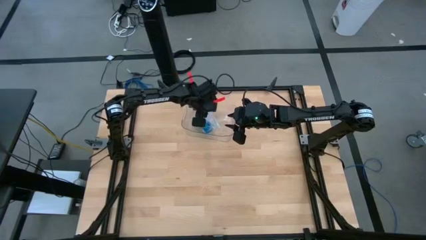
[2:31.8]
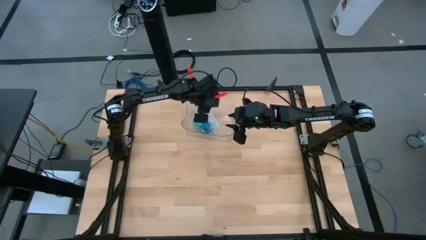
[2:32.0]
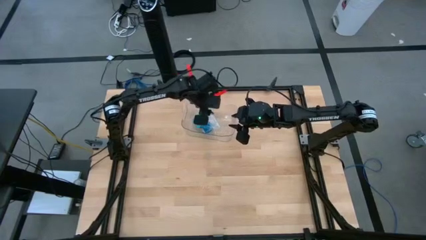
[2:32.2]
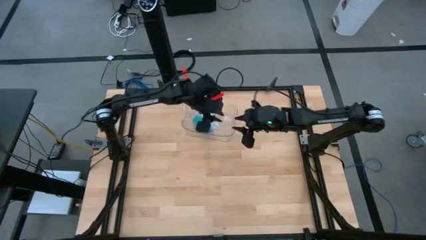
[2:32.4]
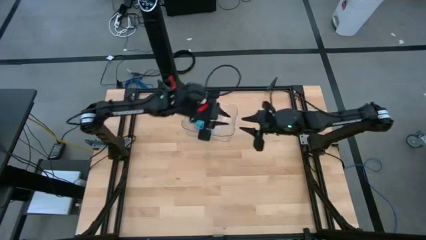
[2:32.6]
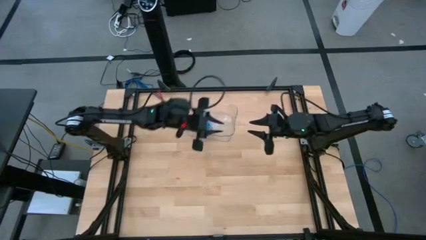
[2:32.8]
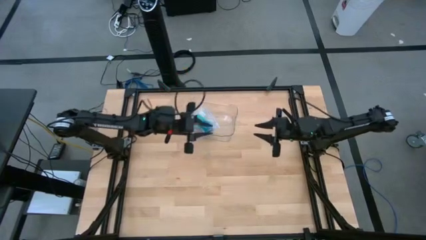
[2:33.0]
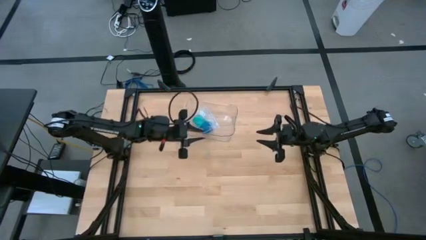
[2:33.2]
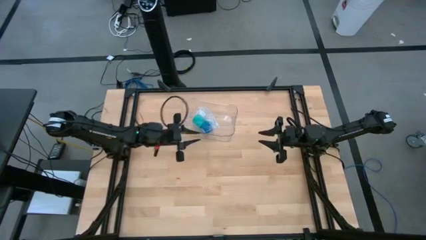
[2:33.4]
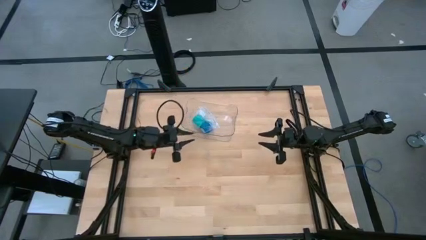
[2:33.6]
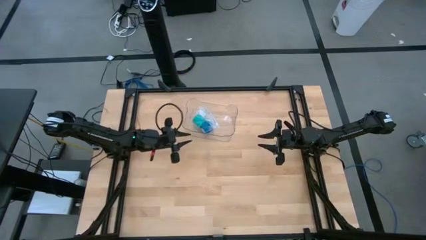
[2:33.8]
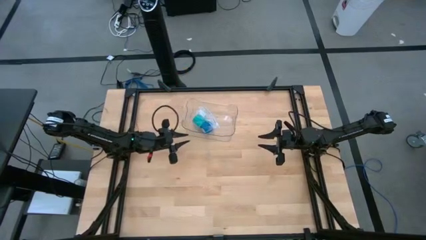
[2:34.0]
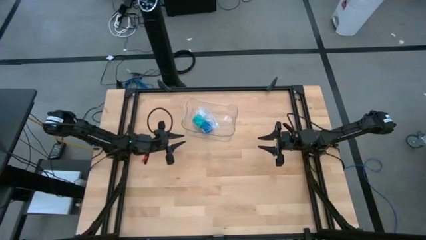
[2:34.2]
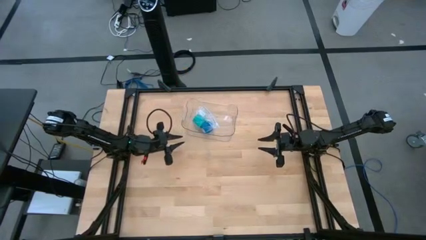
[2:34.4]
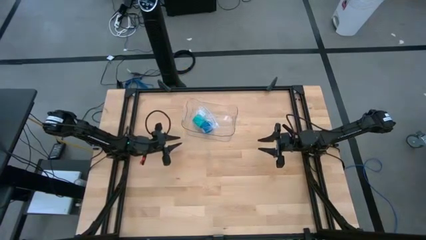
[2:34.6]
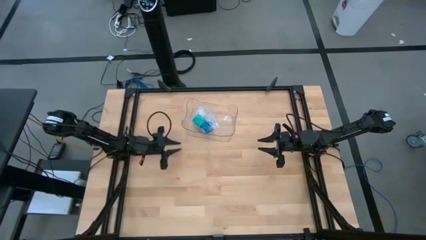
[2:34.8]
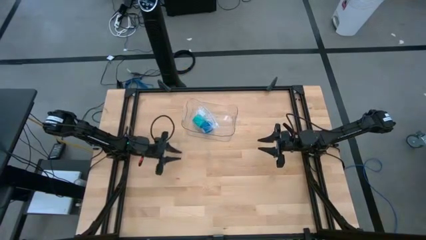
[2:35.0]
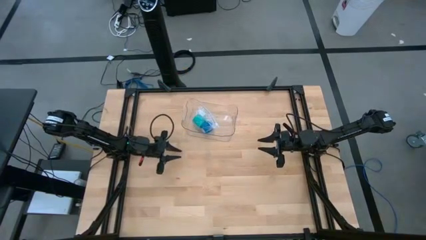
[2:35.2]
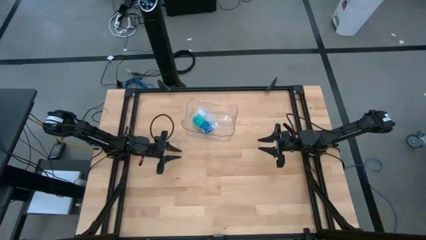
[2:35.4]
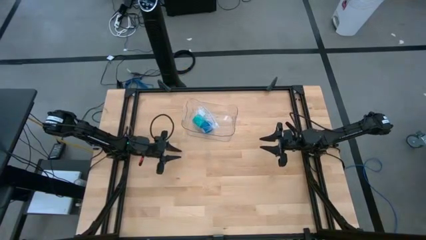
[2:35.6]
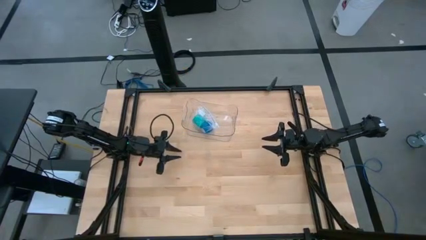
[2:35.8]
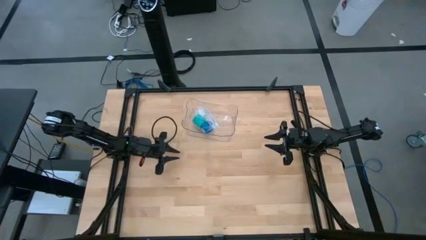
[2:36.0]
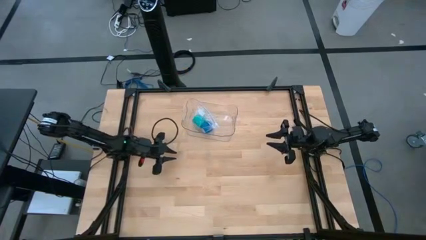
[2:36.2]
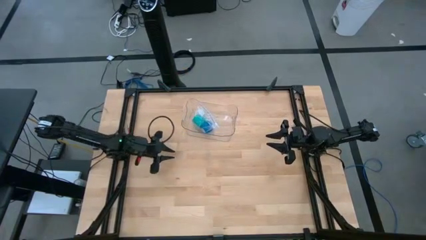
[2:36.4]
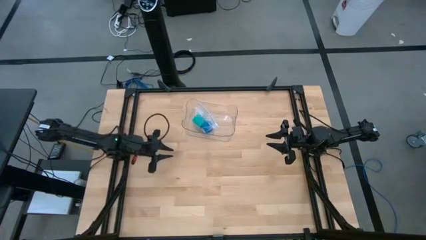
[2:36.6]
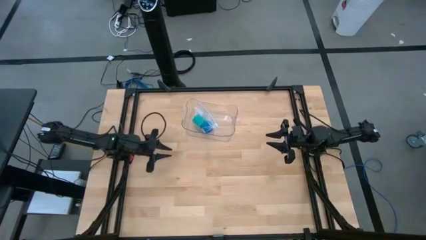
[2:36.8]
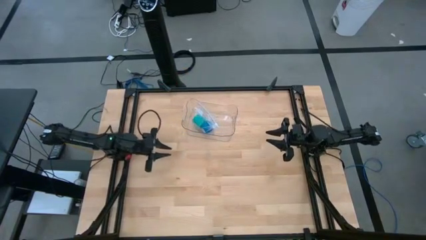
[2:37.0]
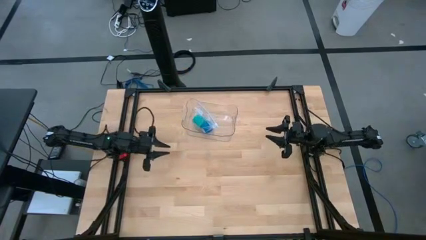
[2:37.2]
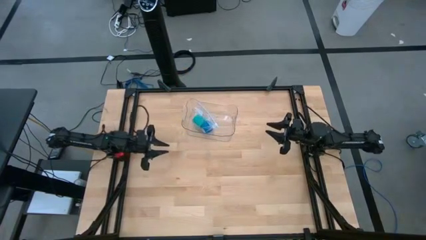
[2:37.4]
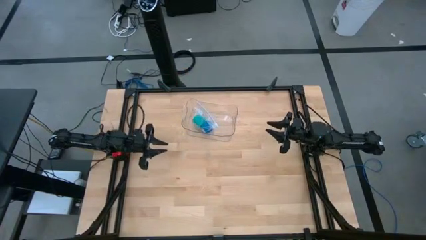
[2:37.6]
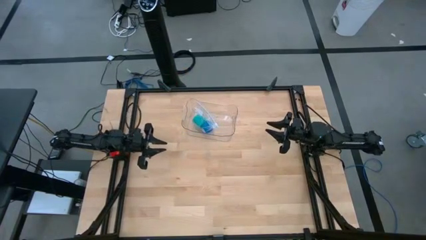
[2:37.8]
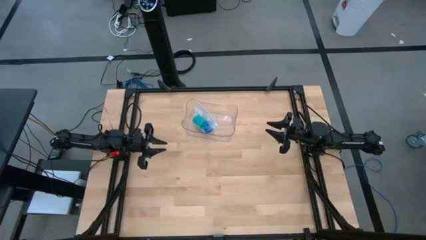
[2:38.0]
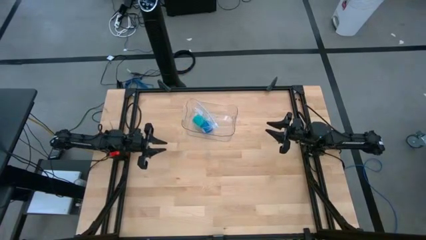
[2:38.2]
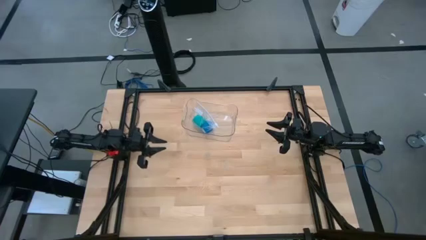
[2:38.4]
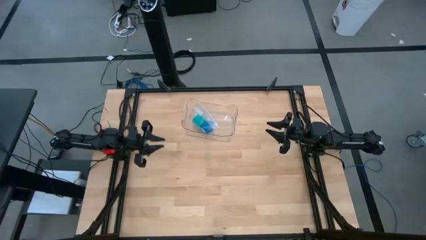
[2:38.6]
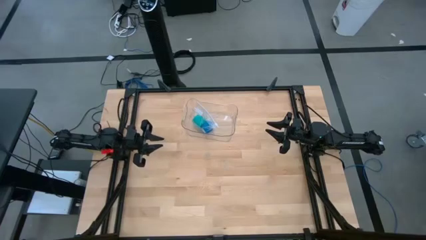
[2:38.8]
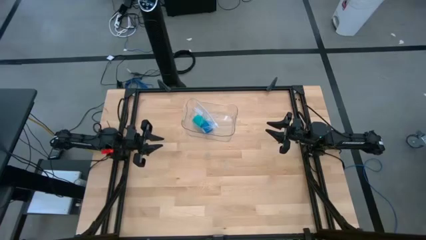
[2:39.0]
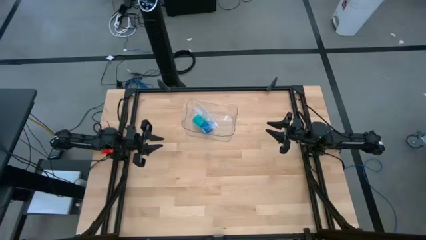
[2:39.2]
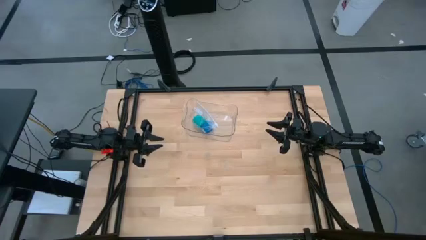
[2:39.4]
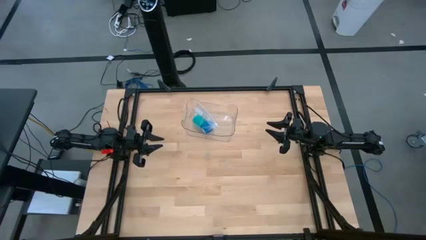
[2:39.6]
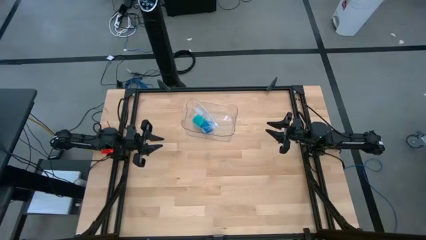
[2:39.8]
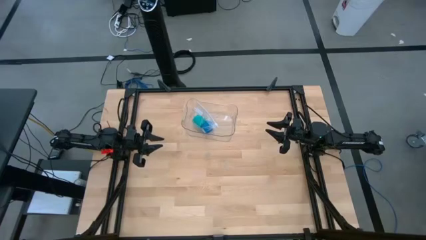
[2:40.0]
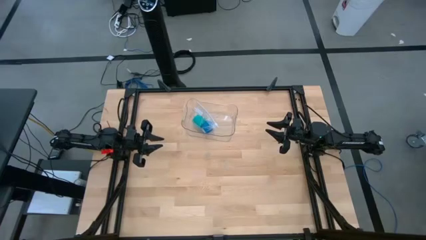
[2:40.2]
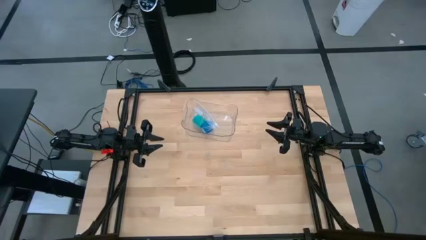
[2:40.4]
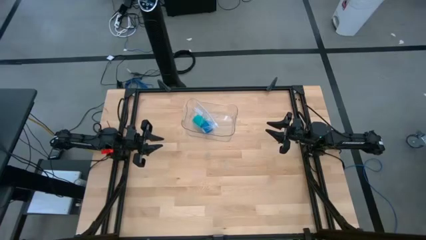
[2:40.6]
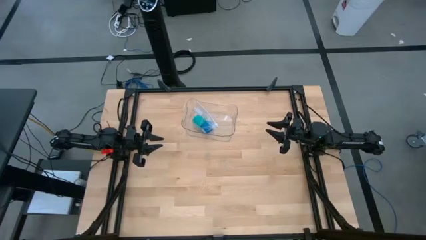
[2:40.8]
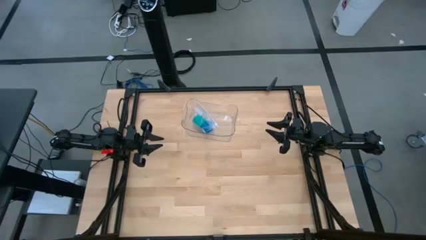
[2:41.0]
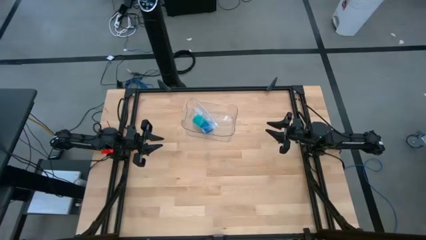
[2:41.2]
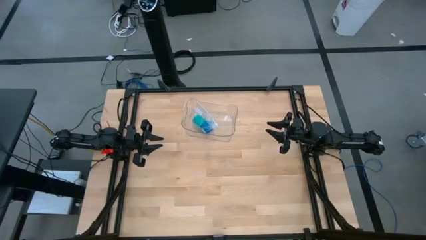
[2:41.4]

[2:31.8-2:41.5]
Task: Roll bandage
Return to Home Position
